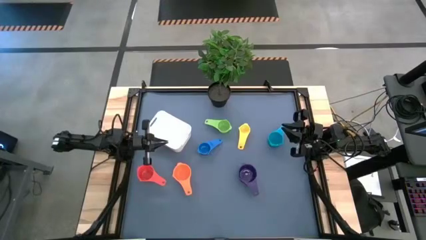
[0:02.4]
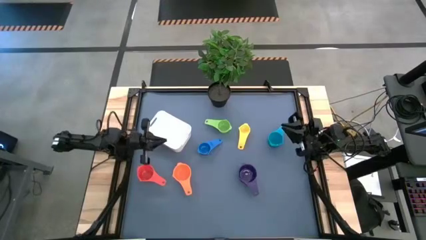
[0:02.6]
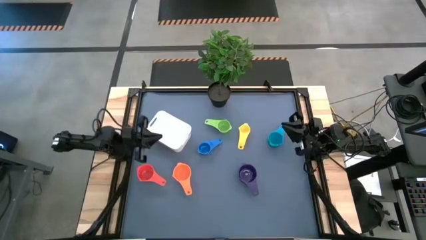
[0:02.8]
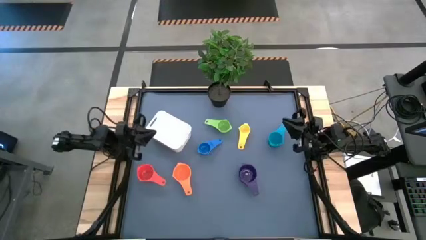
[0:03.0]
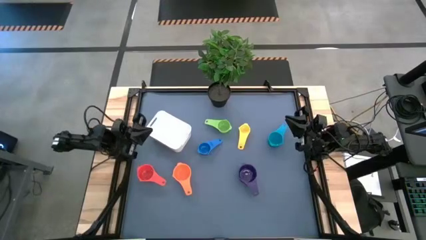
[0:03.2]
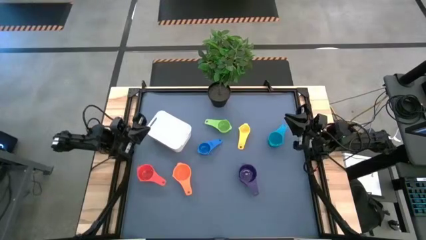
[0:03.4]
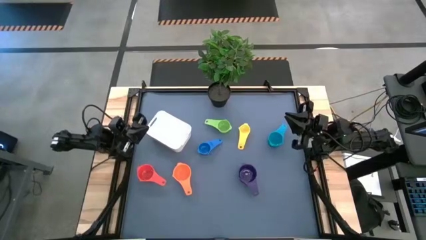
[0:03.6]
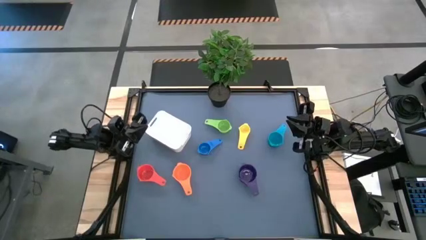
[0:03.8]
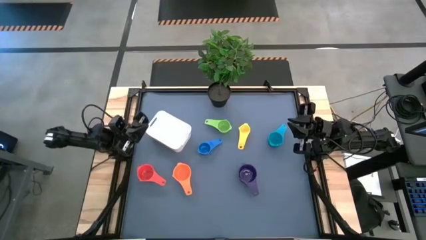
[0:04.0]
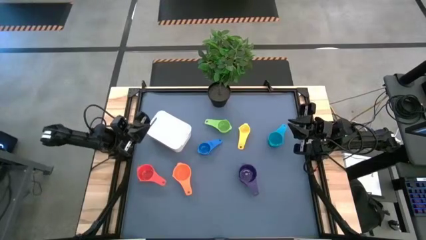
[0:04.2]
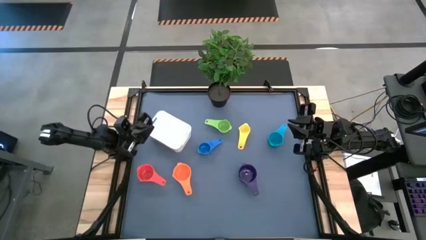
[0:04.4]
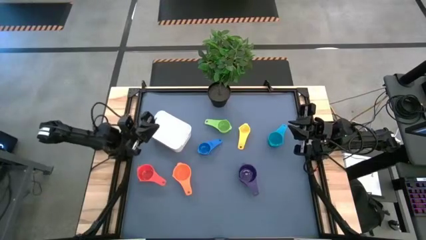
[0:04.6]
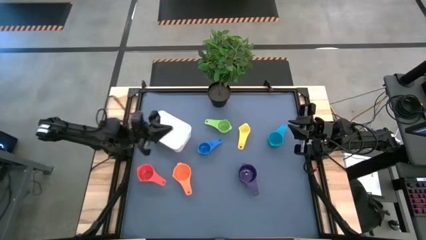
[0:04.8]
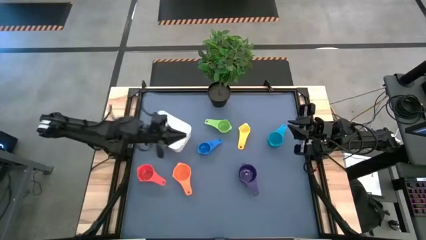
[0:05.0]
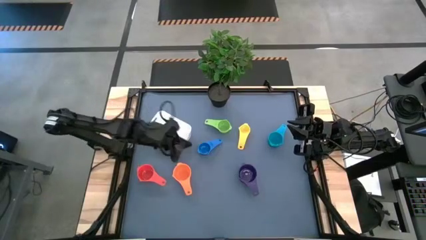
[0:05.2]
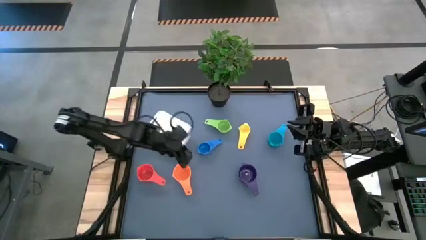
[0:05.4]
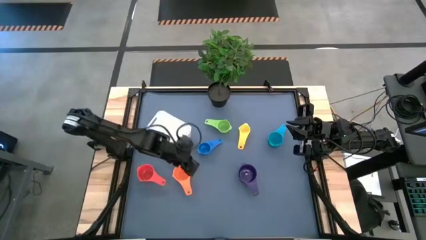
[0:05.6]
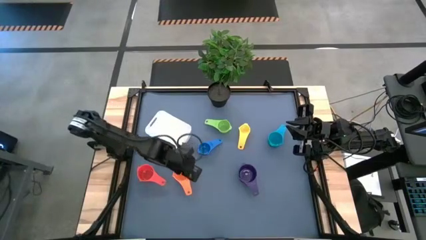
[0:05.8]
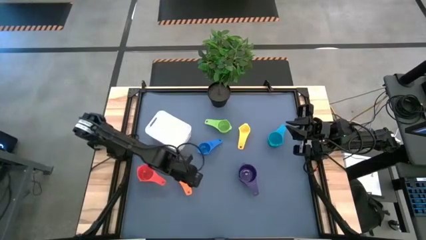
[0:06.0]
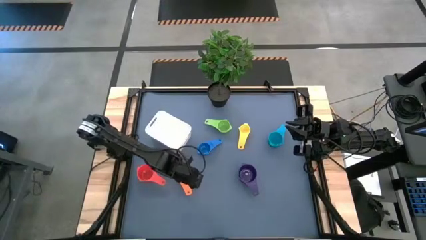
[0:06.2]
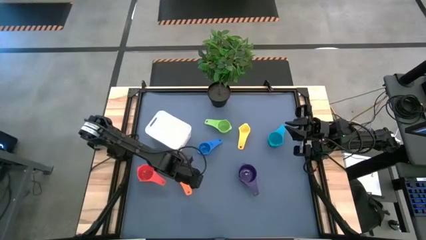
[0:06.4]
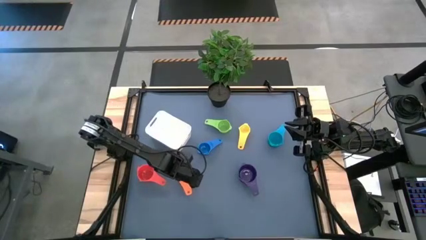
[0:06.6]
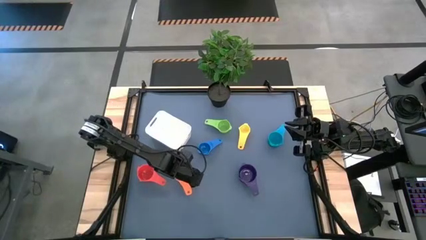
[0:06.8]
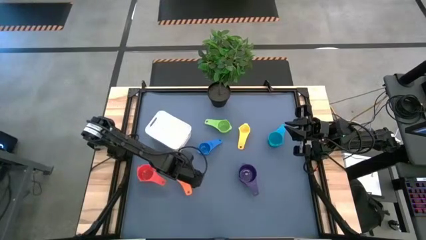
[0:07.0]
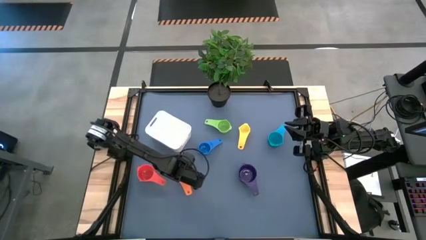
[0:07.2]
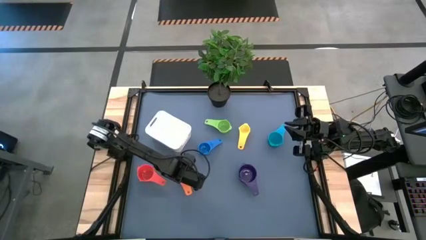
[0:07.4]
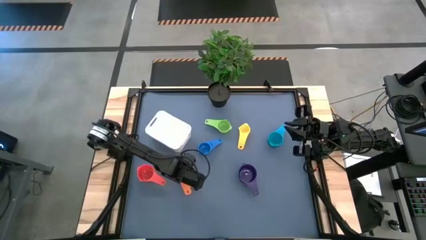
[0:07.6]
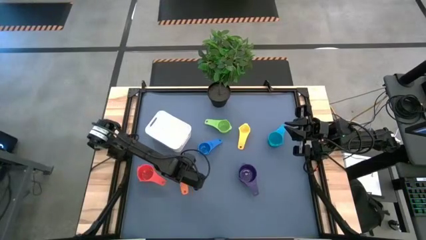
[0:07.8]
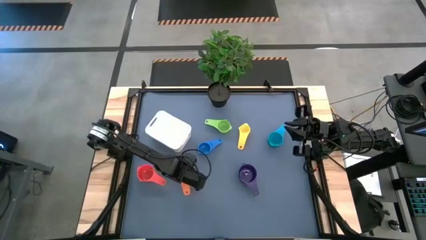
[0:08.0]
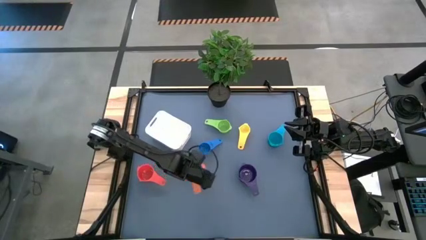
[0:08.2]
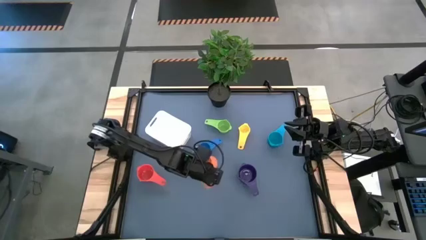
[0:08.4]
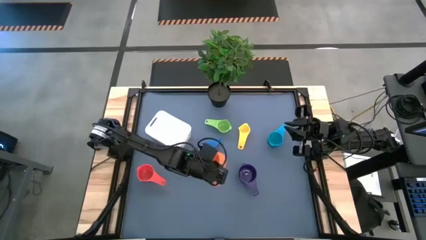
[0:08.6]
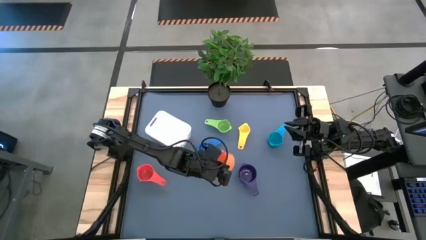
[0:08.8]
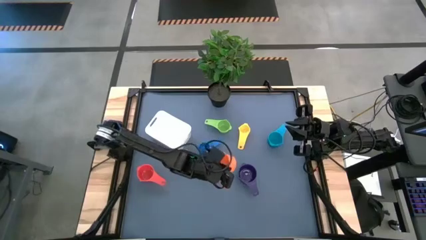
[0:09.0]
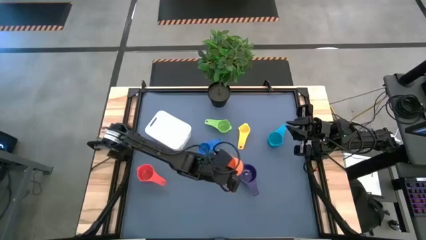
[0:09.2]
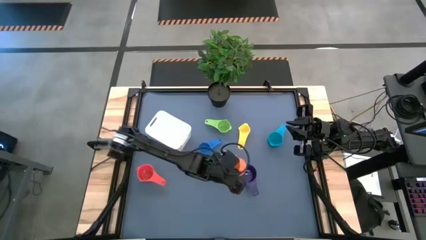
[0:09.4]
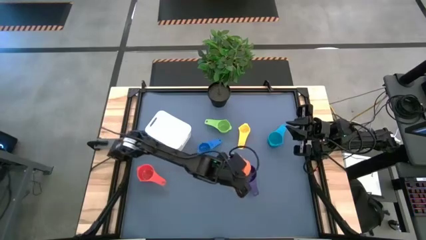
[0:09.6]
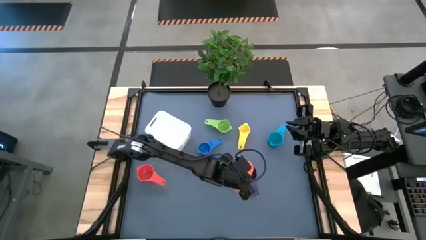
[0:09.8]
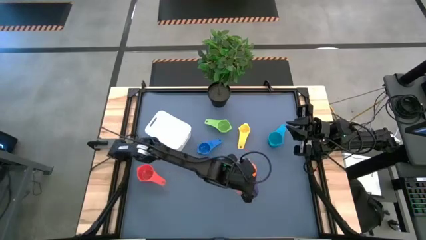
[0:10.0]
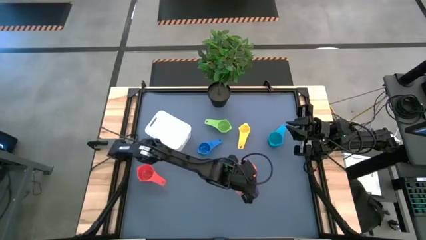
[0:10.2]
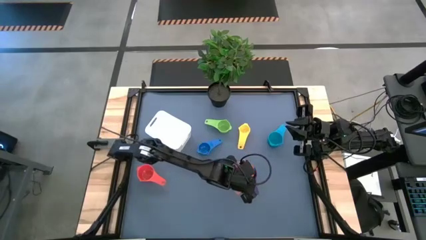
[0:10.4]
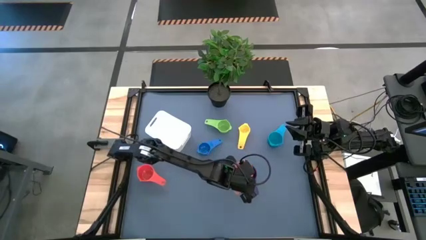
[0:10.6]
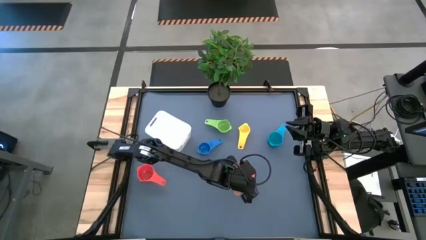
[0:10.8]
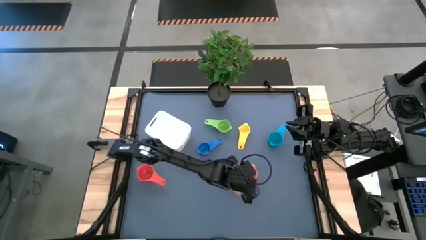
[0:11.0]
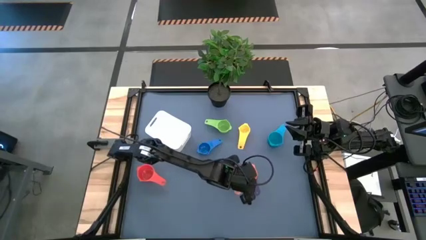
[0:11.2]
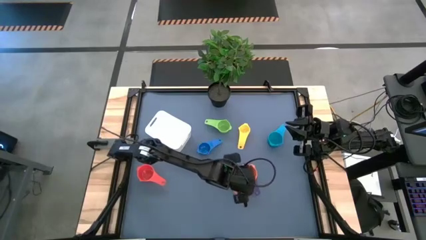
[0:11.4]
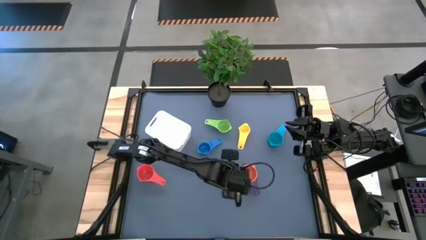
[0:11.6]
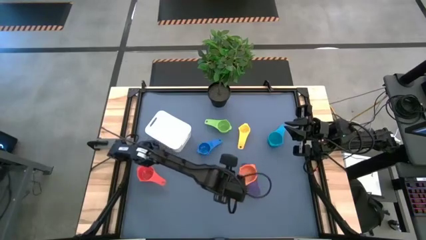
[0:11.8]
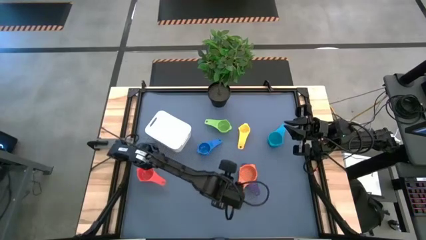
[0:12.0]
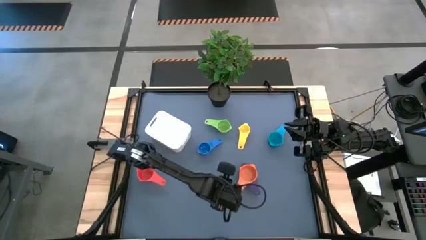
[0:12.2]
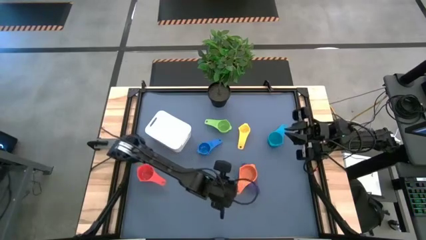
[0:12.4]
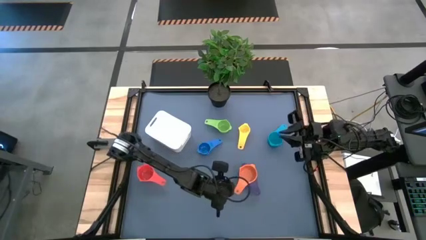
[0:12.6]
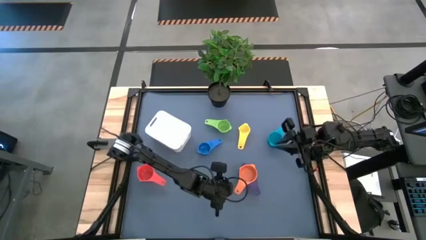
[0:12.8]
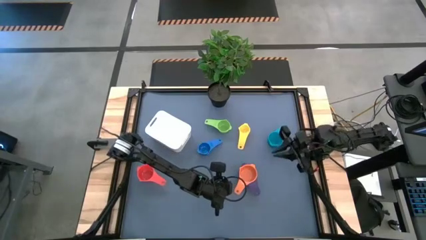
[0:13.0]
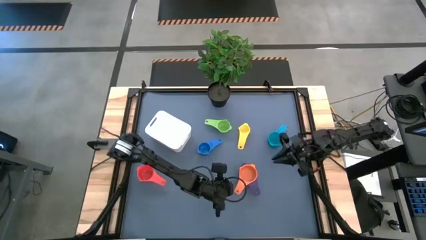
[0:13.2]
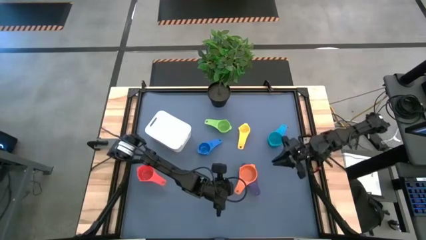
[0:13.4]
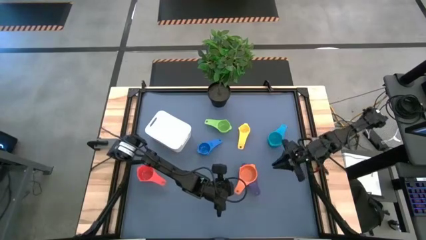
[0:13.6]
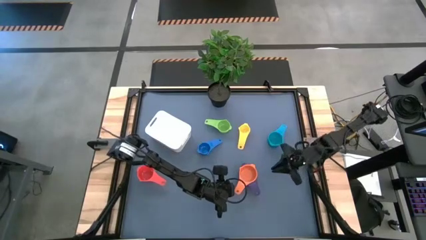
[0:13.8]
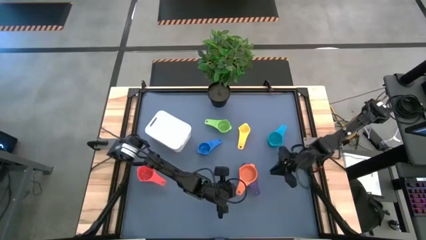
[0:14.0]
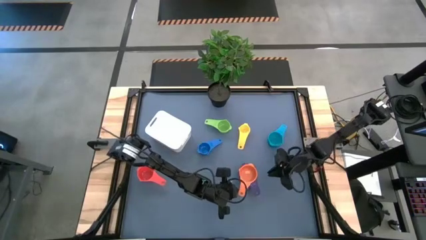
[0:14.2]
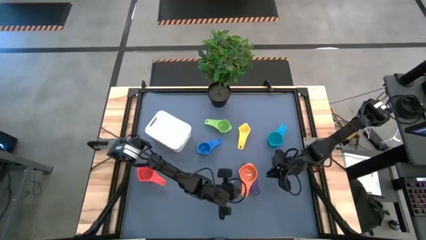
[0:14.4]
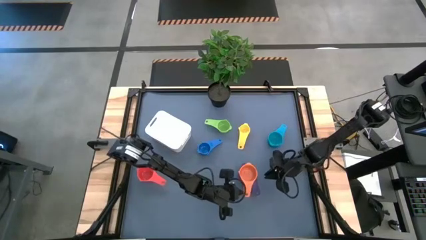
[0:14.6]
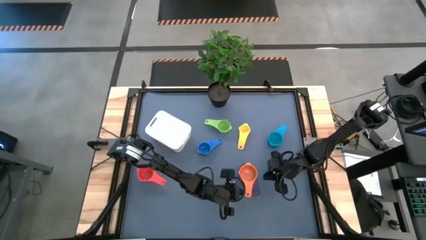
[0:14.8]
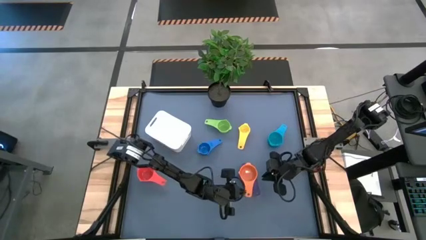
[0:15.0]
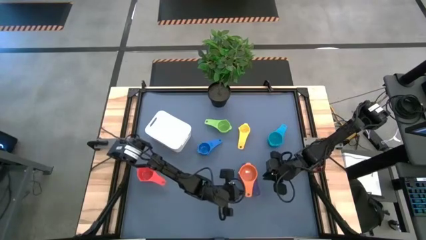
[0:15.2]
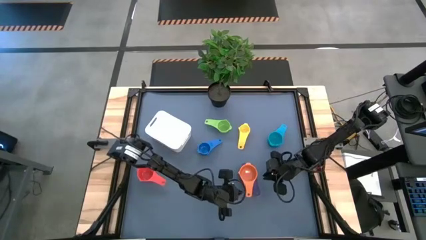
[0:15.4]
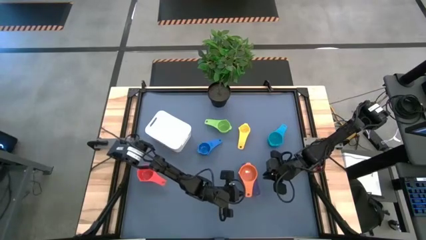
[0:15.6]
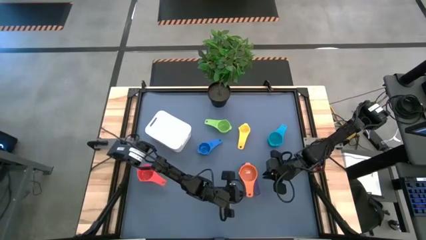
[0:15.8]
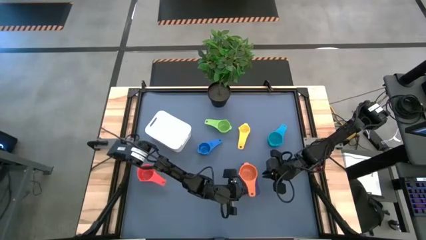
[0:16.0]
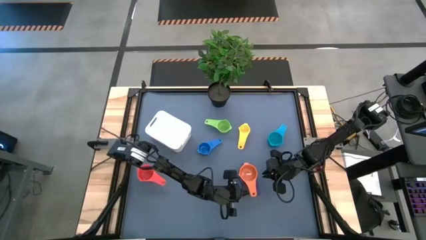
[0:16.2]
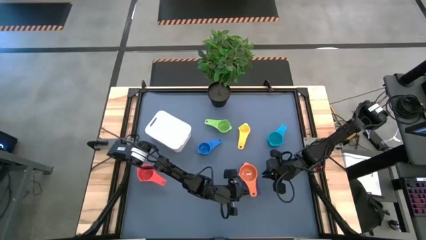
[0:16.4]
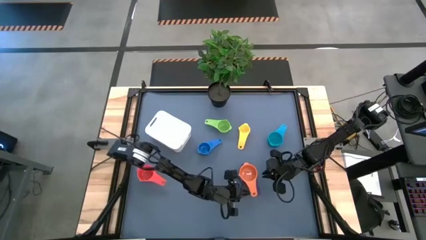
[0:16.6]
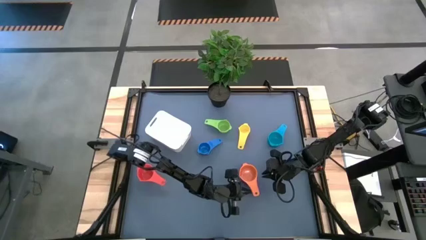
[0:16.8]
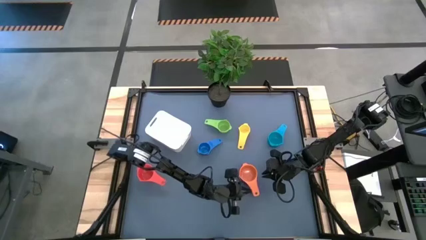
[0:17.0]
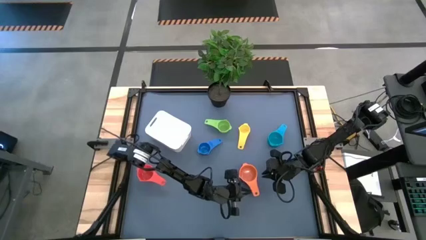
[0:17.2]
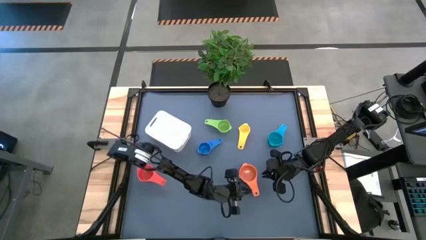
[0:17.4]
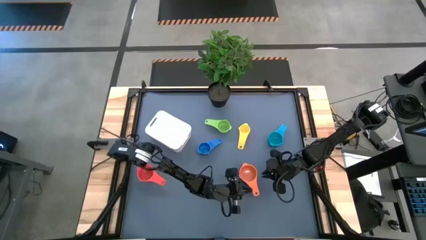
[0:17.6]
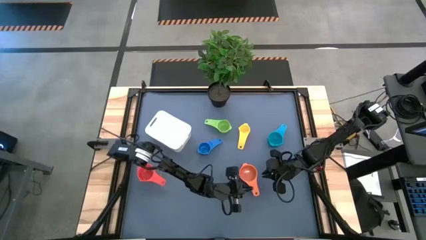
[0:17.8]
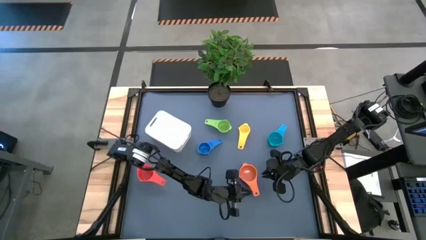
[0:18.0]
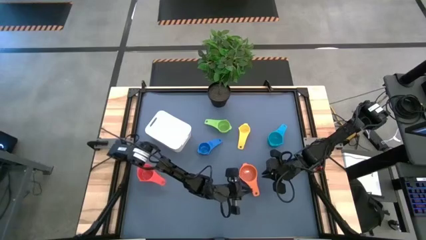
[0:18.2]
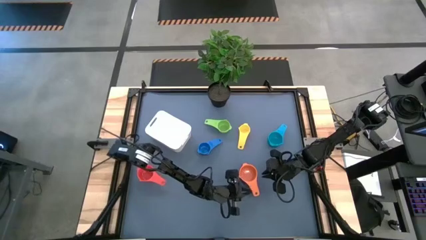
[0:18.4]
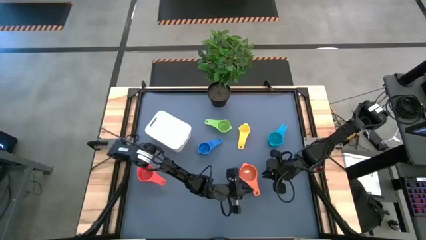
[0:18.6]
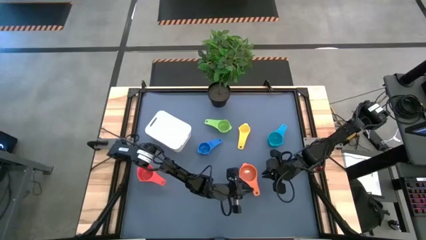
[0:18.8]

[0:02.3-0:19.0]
Task: Nest measuring cups in basket
Stack the orange measuring cup on top of the violet measuring cup
